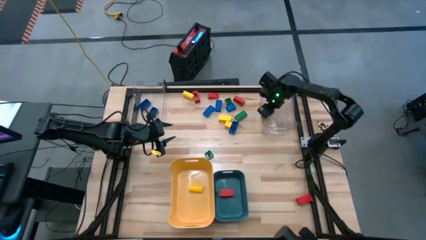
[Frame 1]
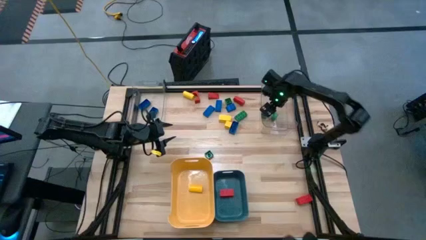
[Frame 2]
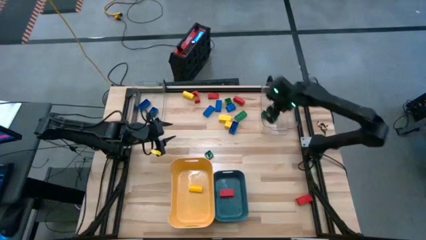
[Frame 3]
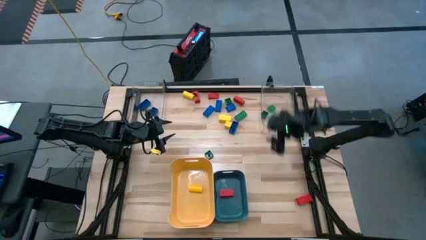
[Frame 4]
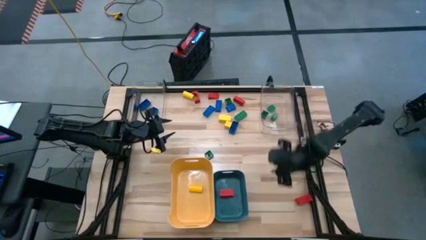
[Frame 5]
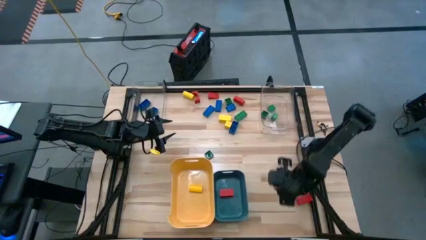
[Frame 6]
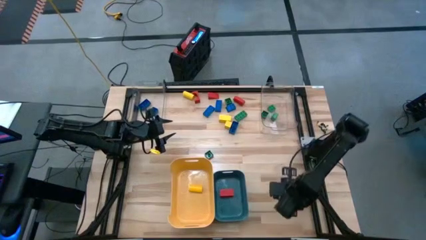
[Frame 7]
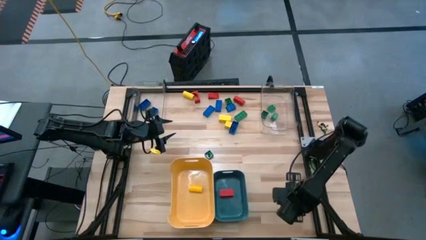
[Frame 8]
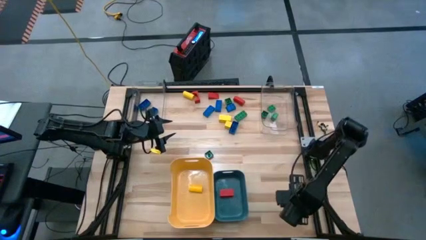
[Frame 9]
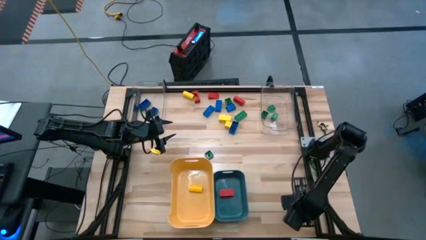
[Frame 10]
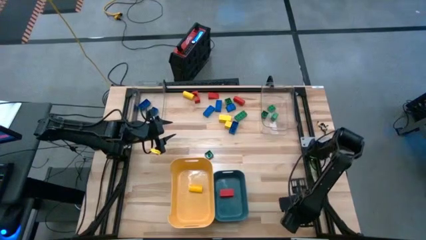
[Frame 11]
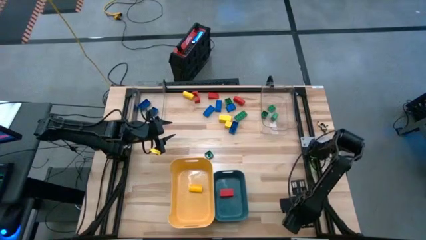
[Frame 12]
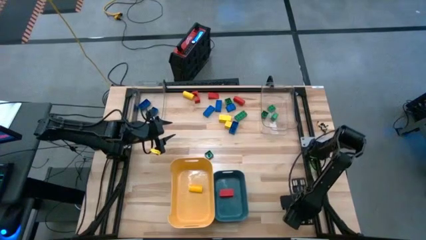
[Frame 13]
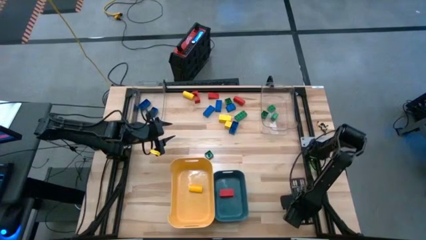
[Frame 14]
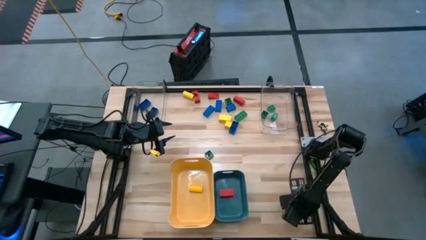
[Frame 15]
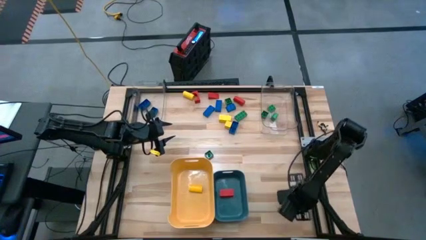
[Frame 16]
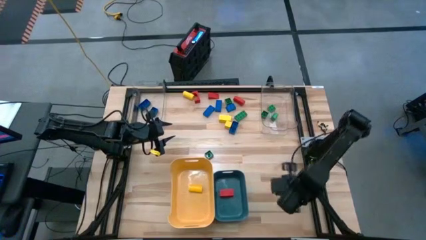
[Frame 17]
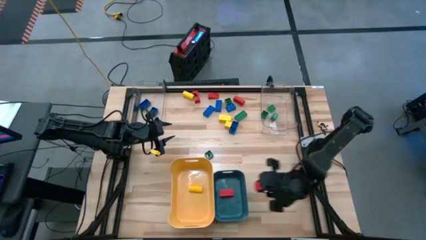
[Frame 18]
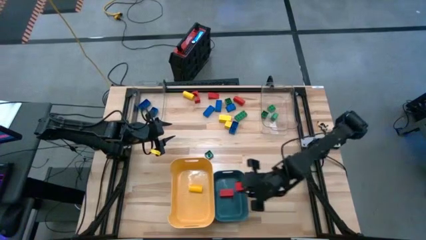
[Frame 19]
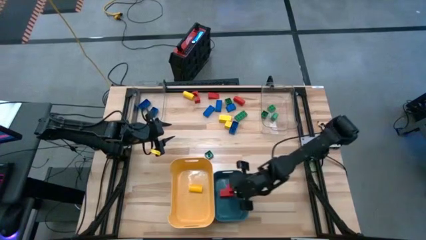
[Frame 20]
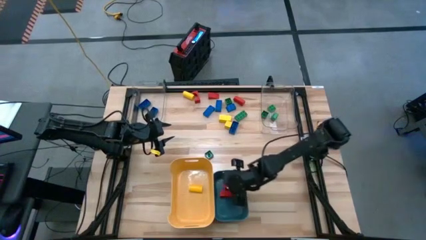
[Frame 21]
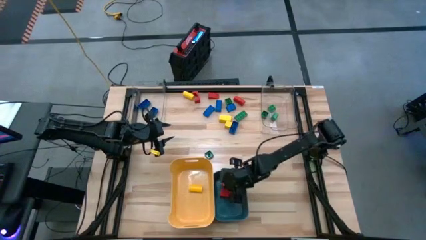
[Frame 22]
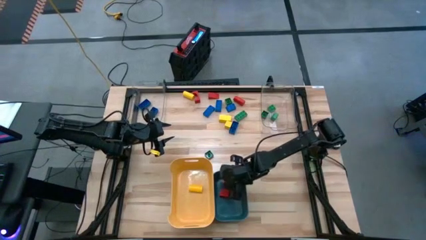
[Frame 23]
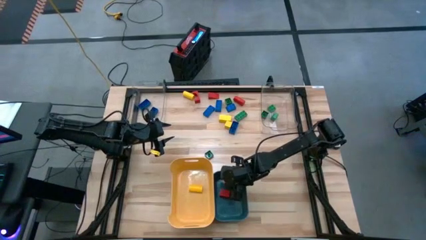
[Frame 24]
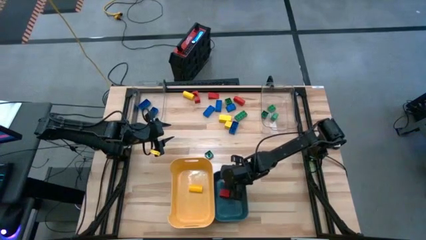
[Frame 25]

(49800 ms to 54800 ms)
Task: Sort blocks
Put the red block into the blue bin

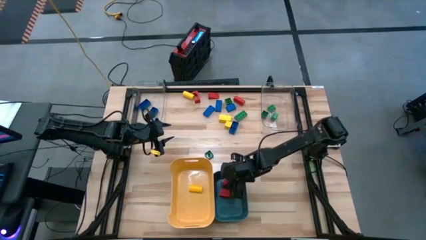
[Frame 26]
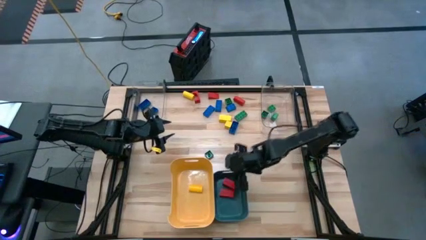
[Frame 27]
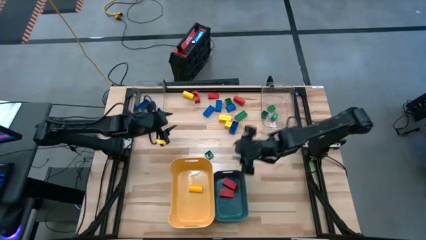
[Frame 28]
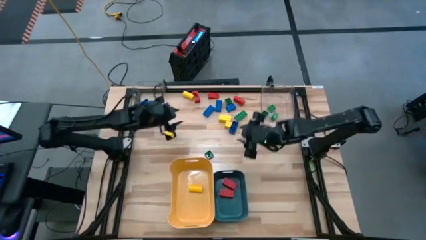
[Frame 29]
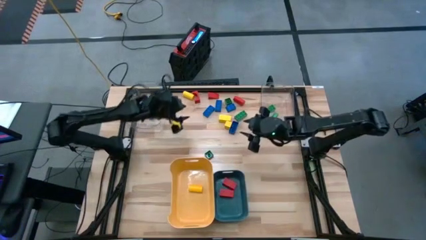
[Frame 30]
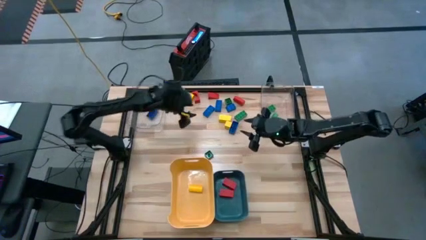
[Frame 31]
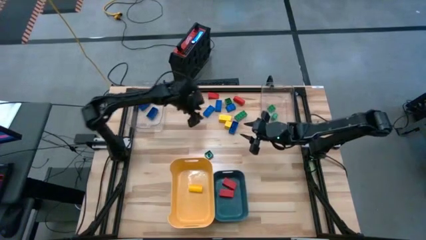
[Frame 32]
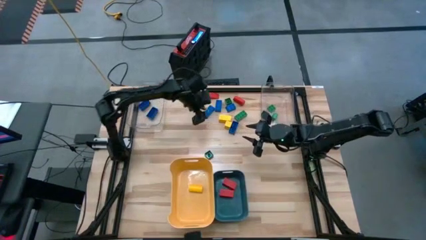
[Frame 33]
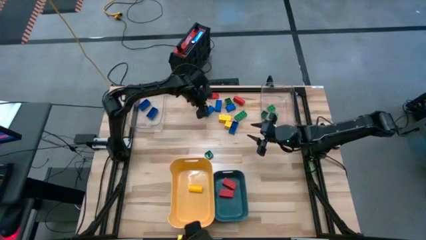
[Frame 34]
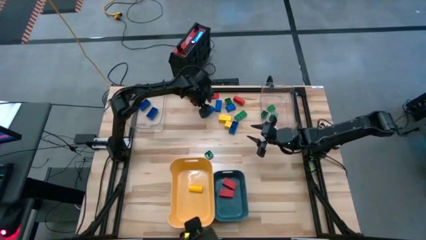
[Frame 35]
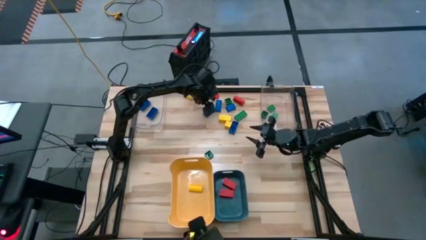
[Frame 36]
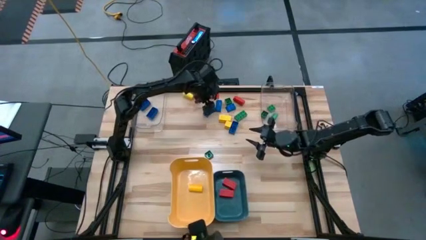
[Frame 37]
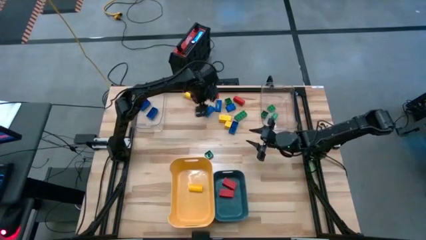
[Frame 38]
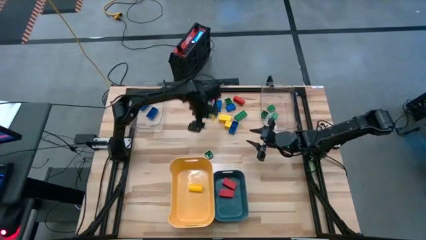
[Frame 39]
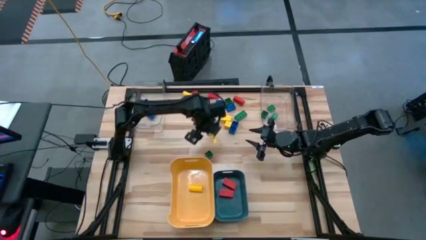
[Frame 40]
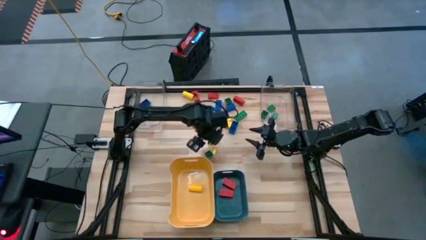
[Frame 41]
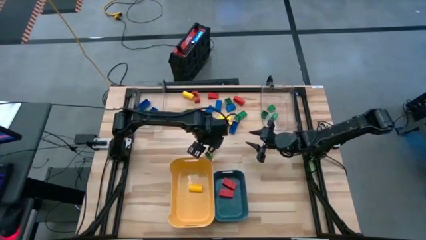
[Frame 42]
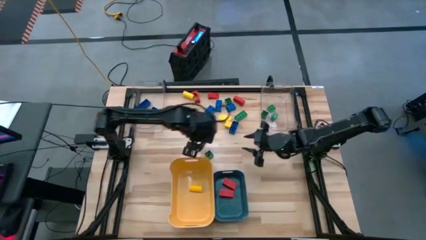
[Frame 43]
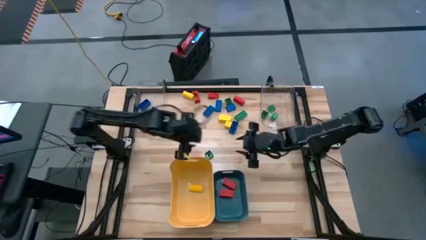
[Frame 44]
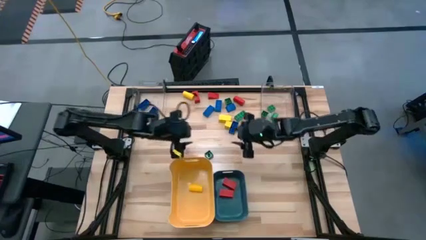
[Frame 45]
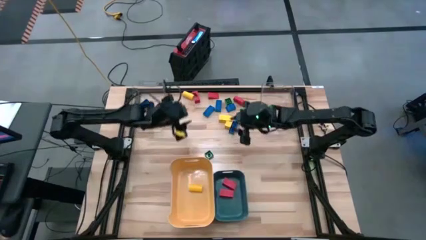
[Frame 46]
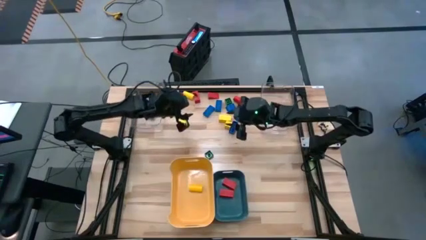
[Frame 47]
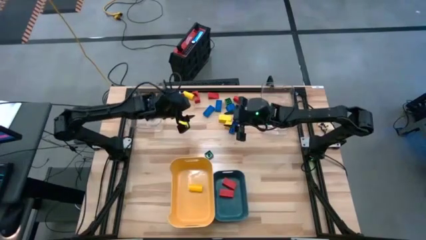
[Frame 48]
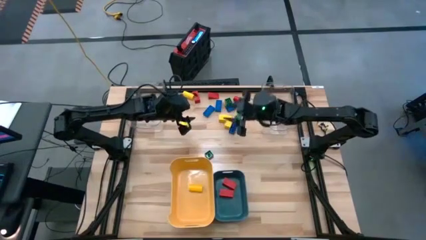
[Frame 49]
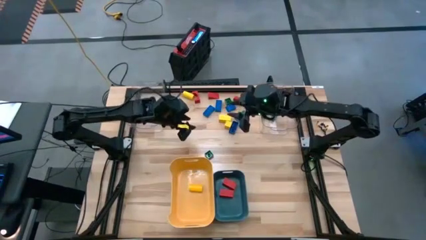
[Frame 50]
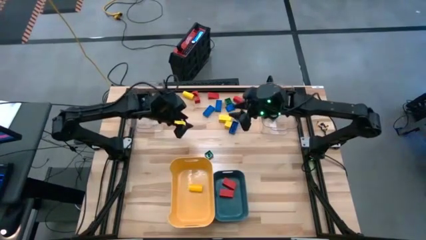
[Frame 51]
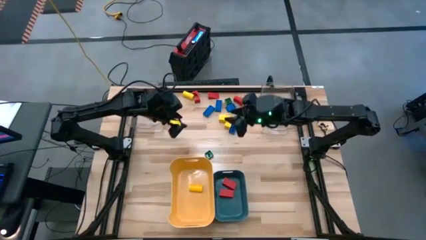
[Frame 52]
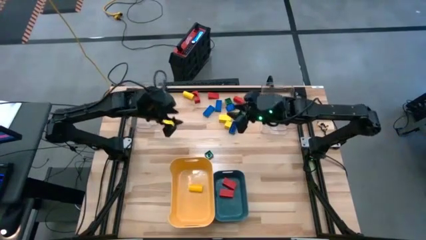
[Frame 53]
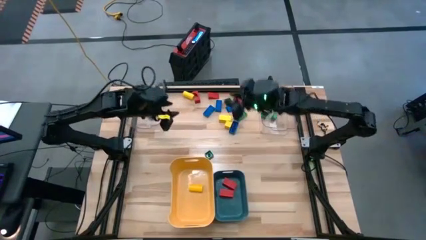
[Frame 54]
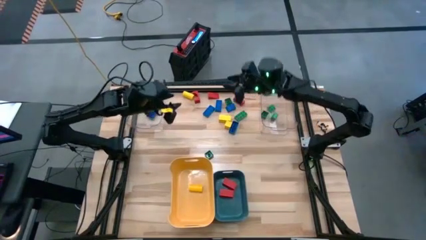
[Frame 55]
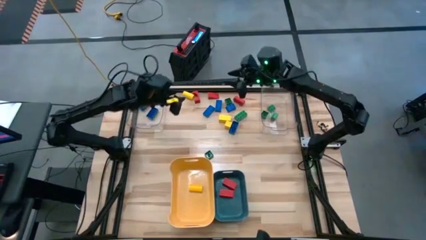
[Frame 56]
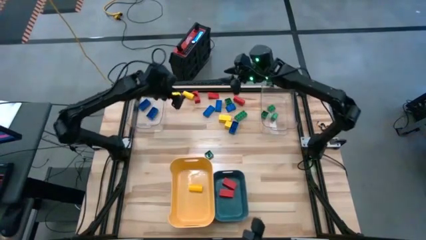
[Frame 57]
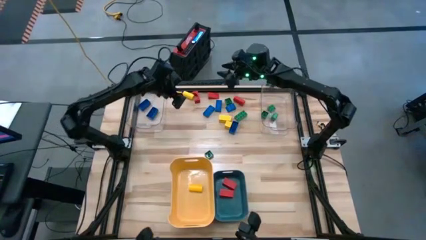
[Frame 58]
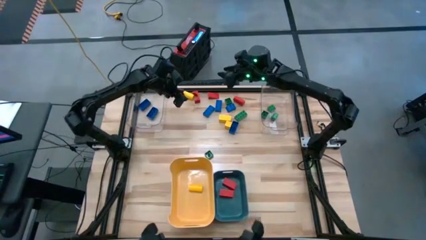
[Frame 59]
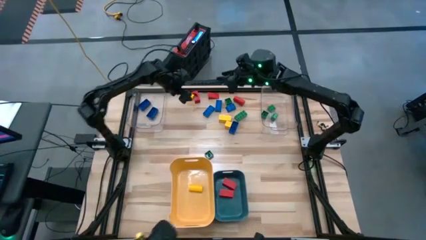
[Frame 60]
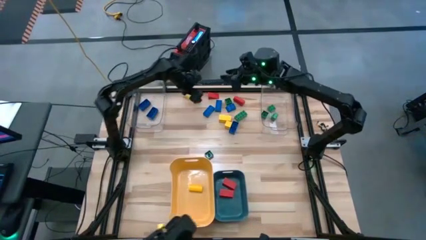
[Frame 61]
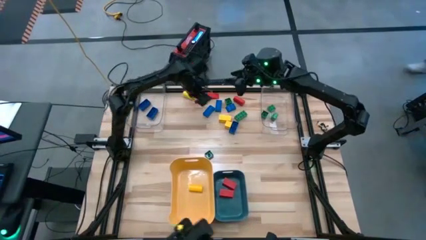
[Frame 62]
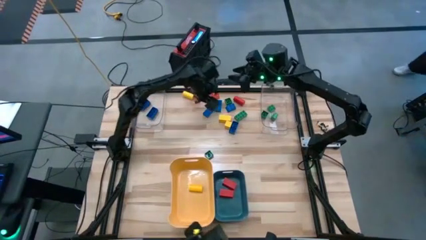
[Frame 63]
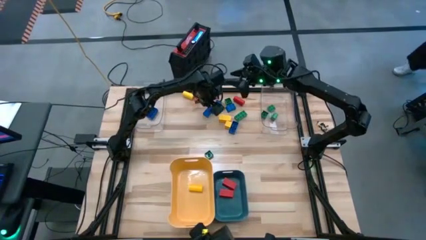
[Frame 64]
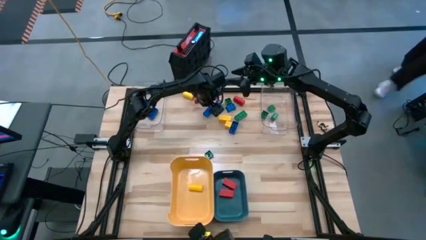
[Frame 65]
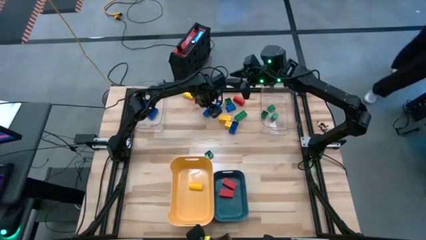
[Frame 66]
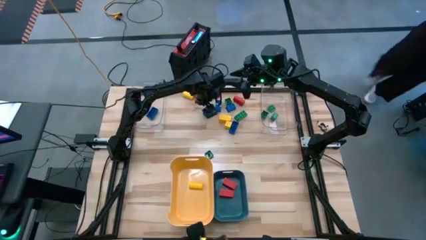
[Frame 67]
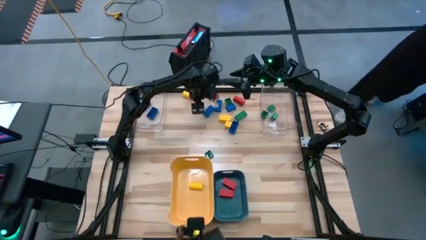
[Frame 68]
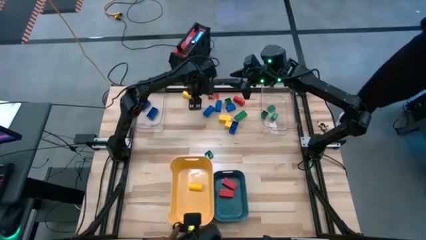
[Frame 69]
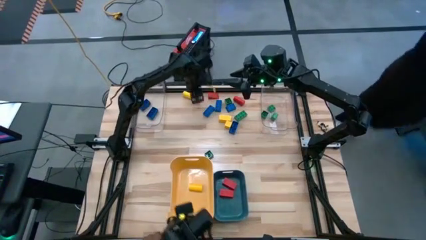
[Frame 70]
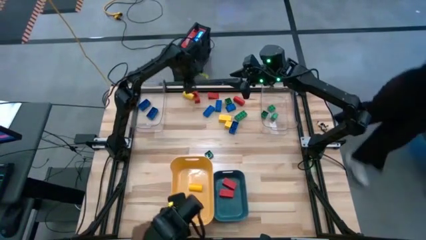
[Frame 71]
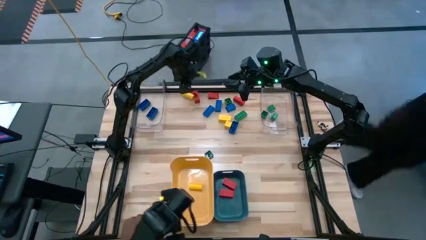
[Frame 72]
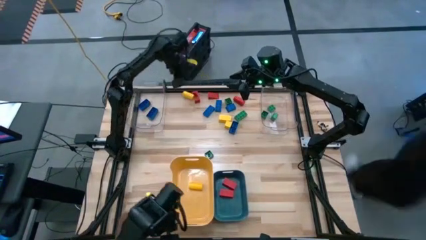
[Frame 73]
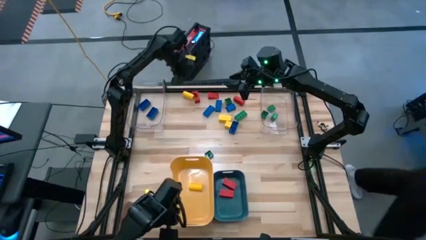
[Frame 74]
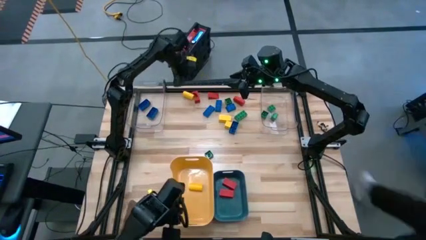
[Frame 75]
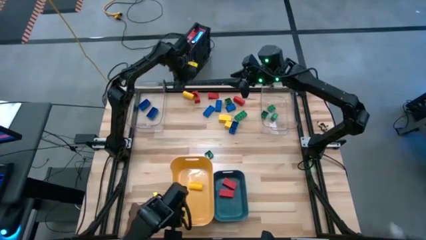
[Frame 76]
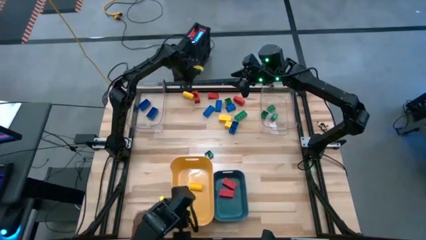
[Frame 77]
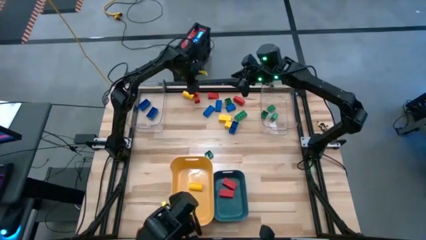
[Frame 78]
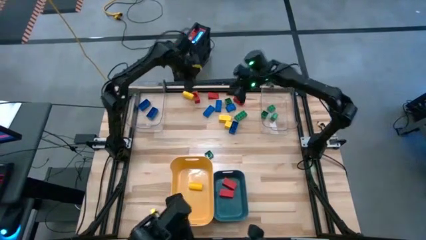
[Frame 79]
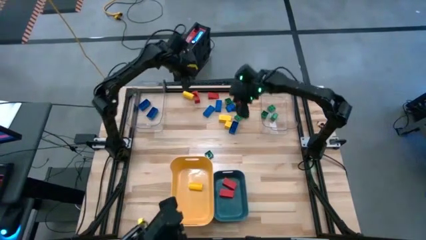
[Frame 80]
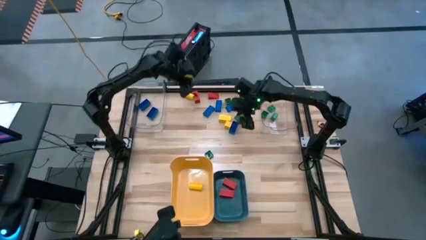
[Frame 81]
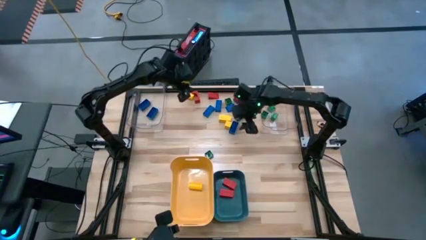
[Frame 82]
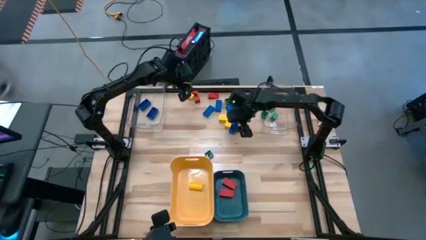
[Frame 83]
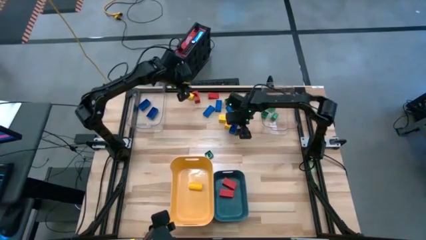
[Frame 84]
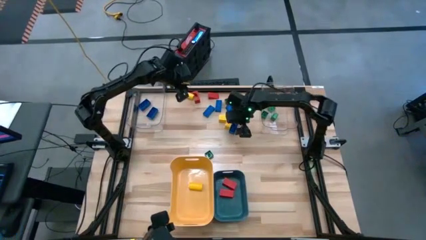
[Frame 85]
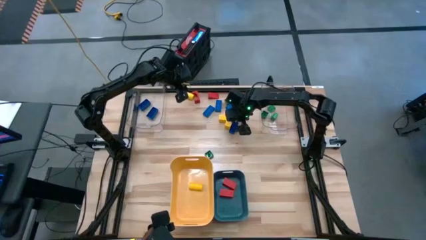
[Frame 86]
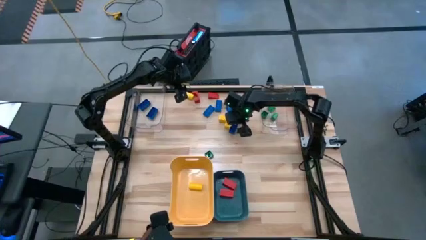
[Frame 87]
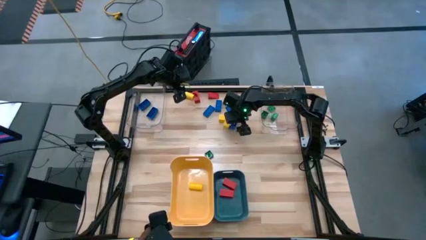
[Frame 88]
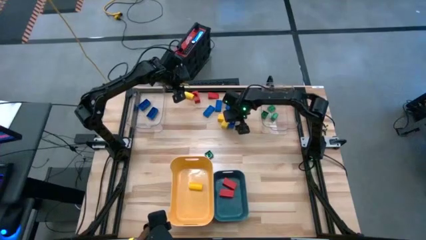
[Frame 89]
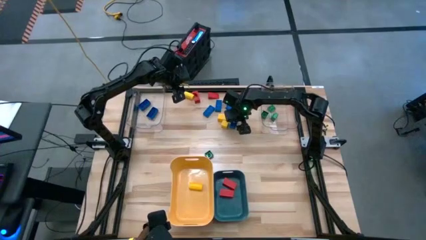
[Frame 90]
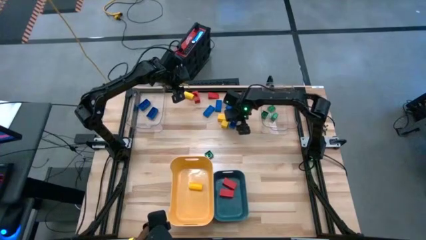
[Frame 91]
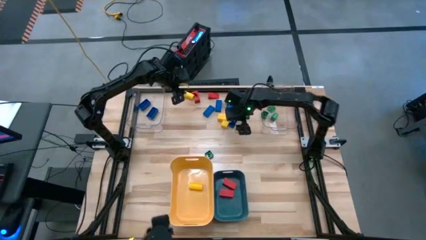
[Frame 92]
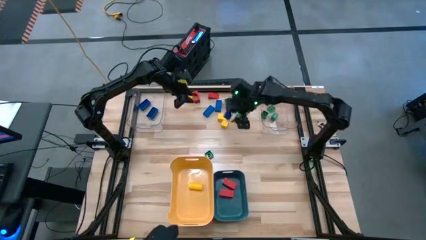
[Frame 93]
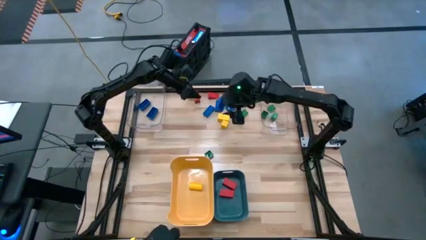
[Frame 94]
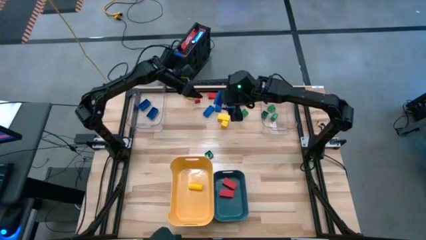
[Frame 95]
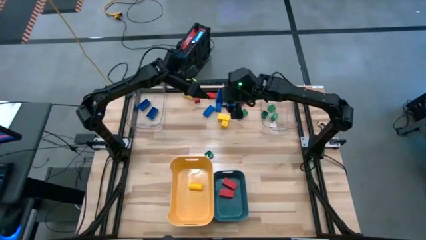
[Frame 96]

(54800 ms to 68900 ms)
Put the blue game piece into the left transparent bin
